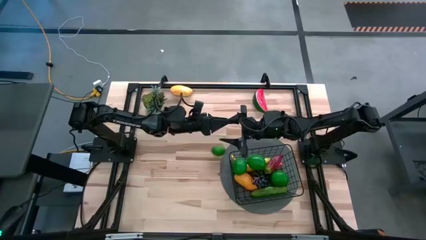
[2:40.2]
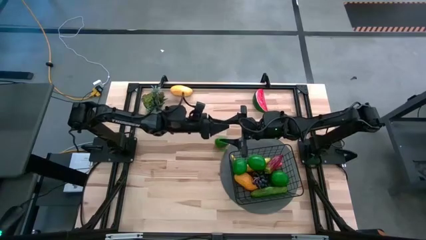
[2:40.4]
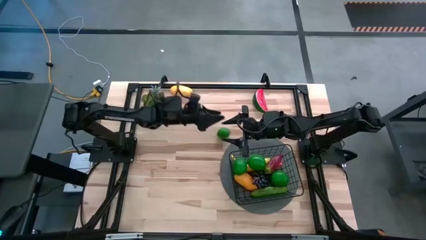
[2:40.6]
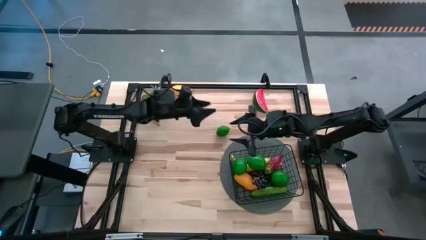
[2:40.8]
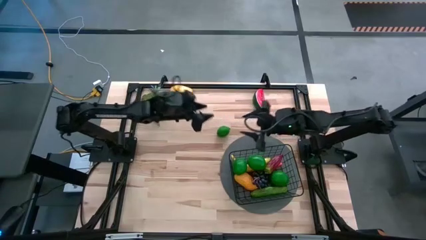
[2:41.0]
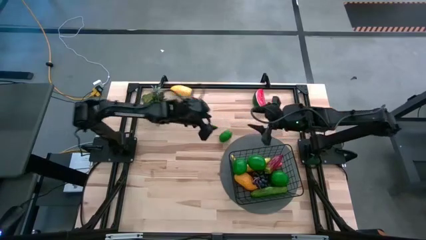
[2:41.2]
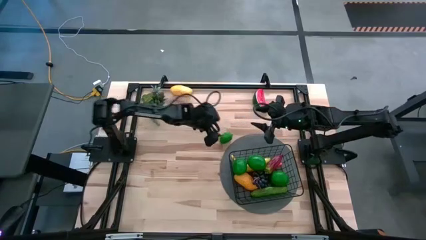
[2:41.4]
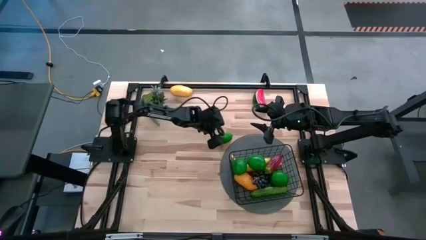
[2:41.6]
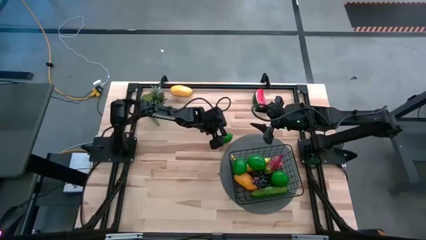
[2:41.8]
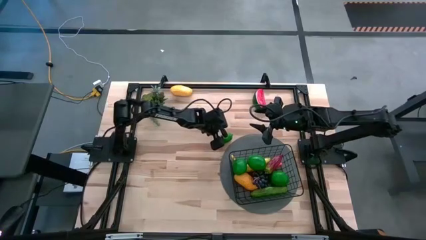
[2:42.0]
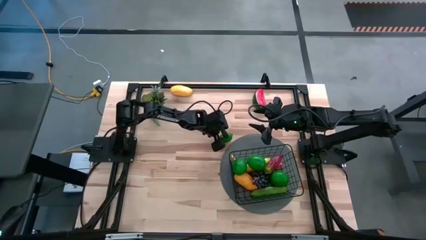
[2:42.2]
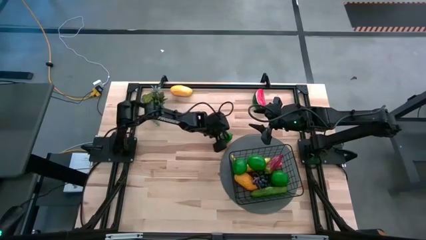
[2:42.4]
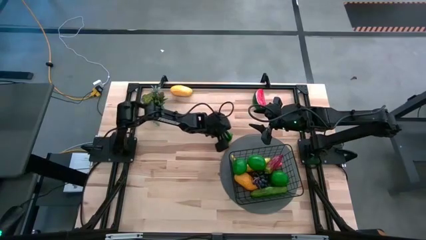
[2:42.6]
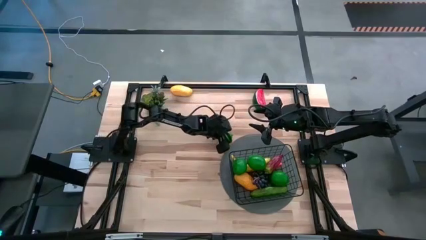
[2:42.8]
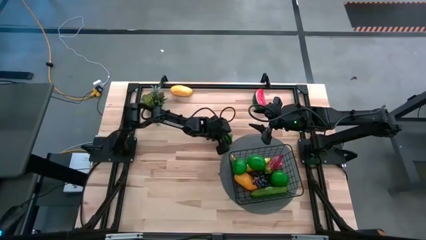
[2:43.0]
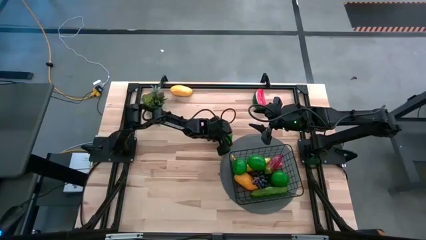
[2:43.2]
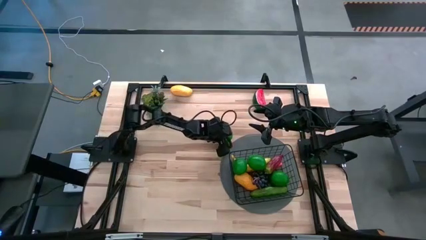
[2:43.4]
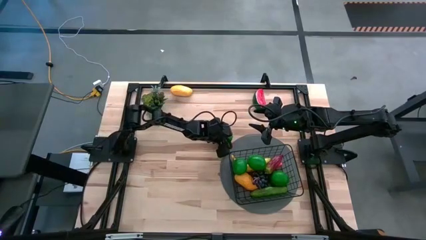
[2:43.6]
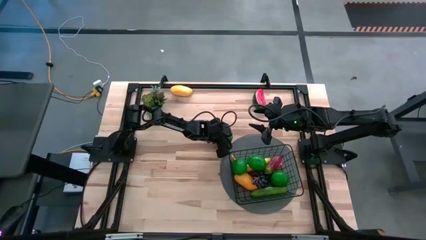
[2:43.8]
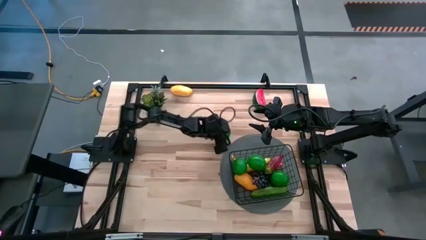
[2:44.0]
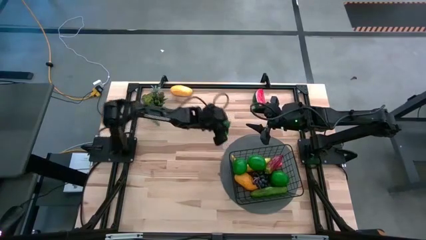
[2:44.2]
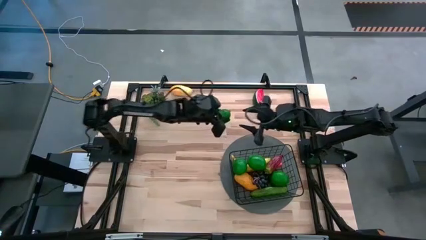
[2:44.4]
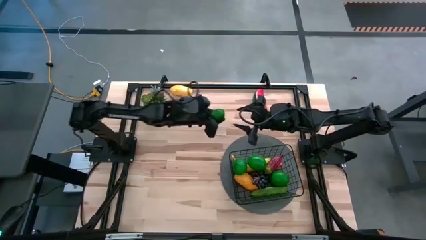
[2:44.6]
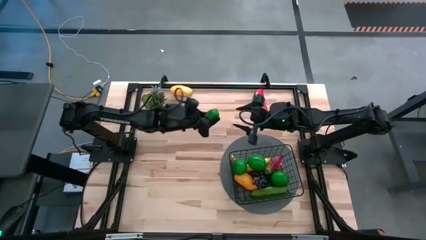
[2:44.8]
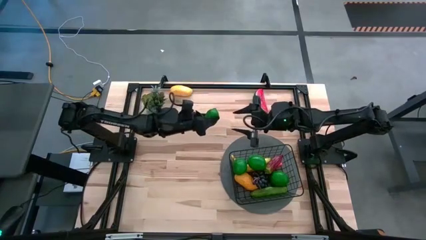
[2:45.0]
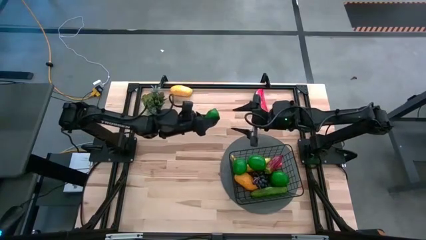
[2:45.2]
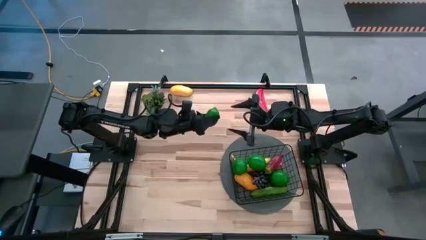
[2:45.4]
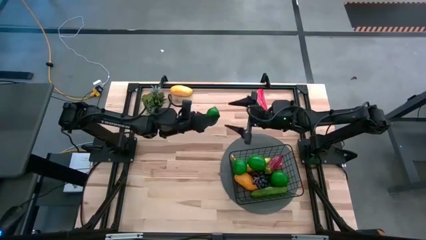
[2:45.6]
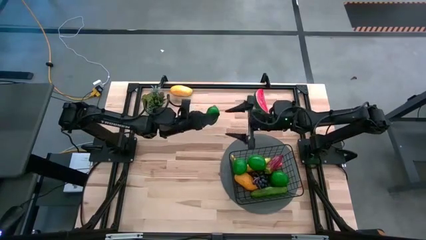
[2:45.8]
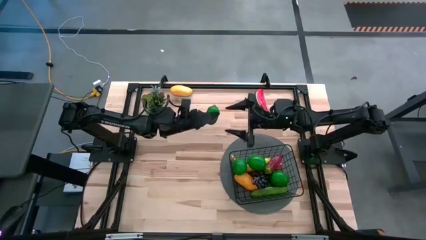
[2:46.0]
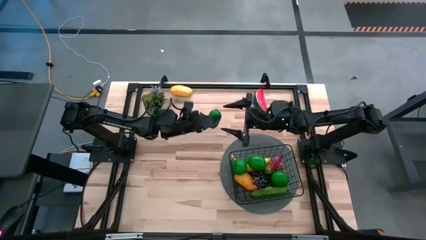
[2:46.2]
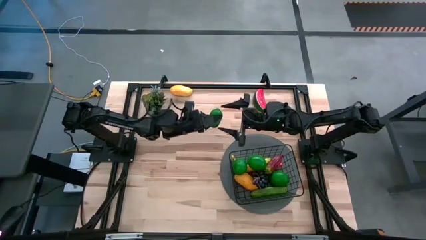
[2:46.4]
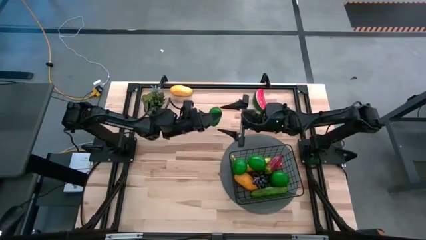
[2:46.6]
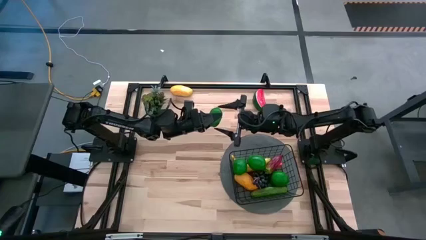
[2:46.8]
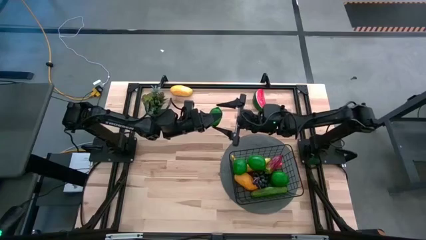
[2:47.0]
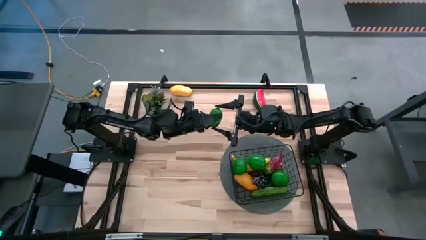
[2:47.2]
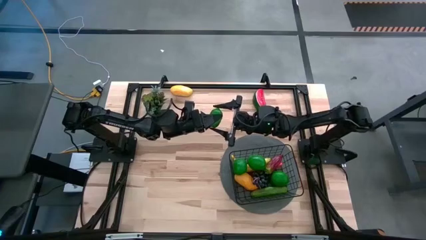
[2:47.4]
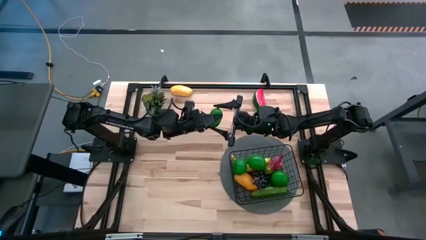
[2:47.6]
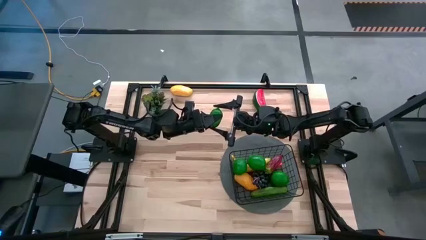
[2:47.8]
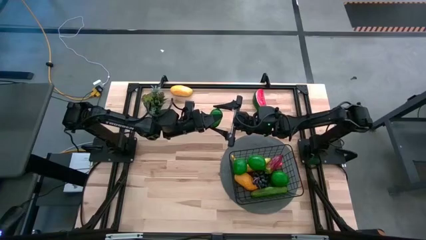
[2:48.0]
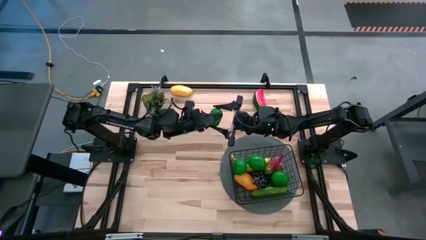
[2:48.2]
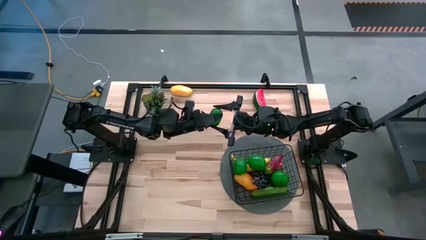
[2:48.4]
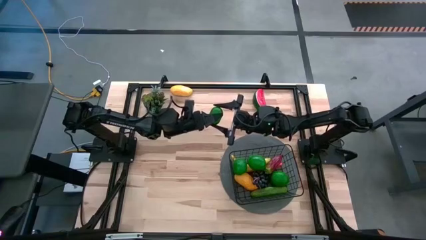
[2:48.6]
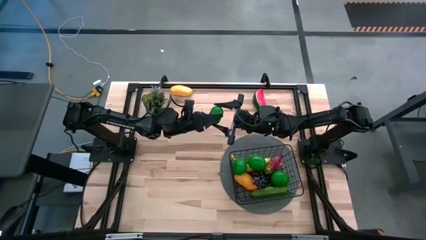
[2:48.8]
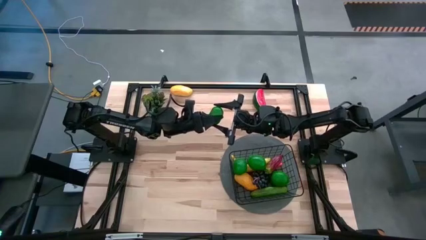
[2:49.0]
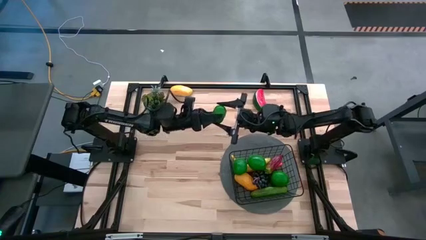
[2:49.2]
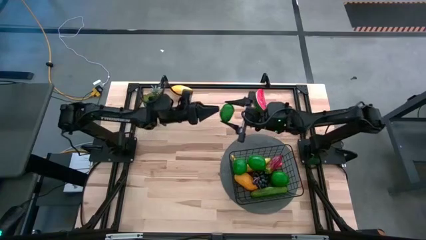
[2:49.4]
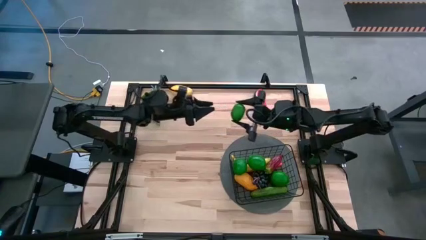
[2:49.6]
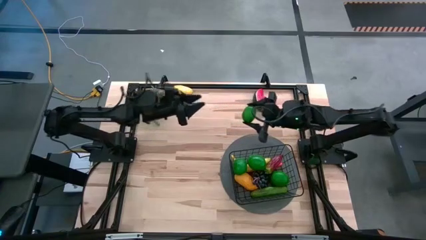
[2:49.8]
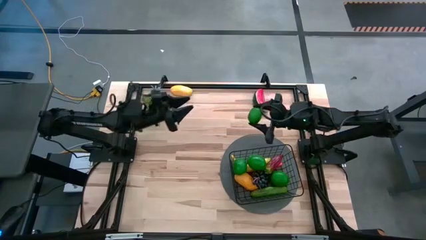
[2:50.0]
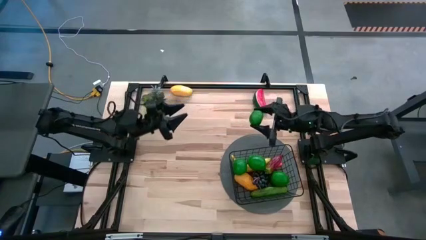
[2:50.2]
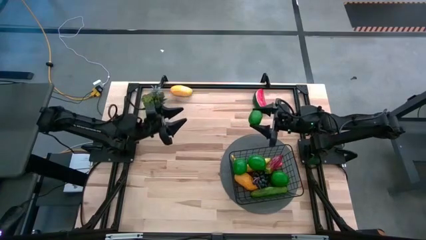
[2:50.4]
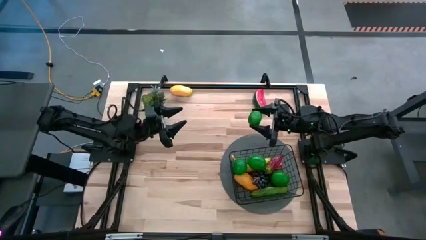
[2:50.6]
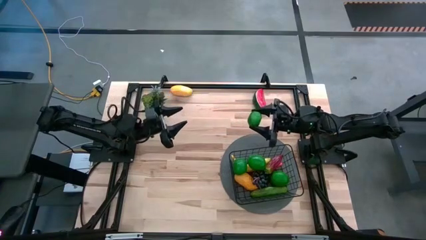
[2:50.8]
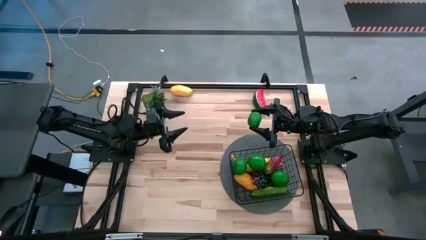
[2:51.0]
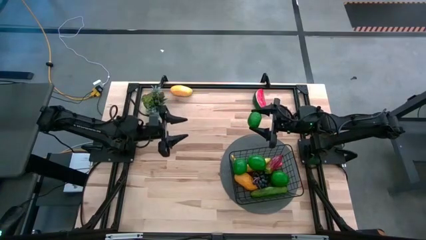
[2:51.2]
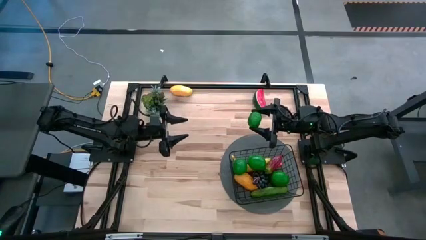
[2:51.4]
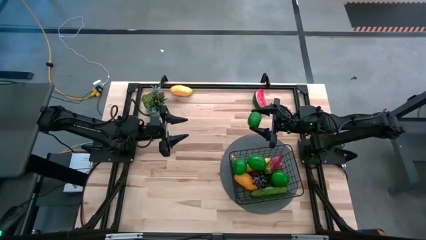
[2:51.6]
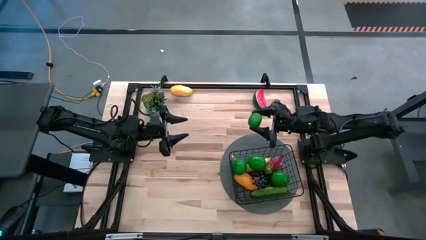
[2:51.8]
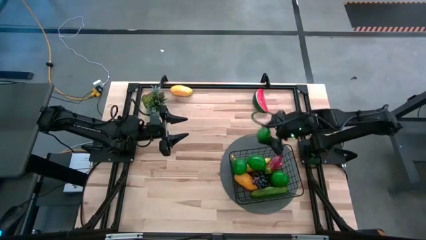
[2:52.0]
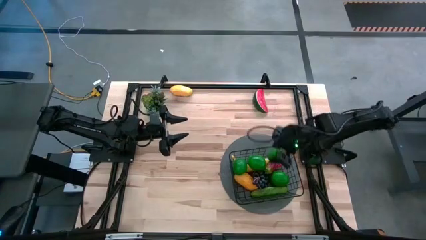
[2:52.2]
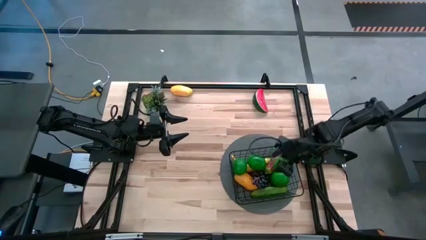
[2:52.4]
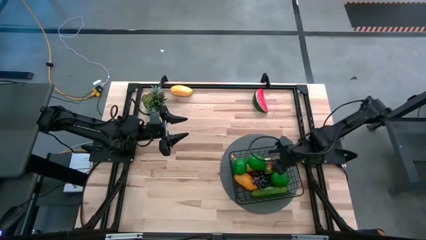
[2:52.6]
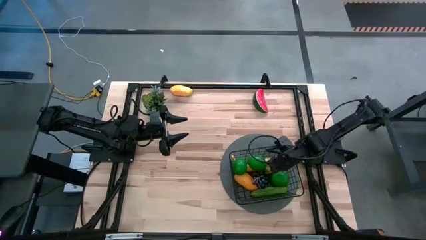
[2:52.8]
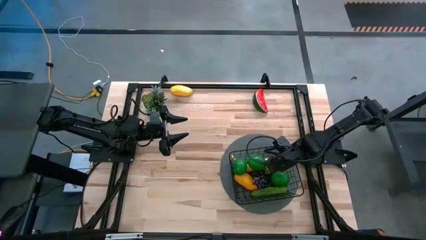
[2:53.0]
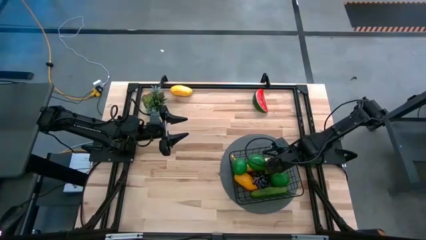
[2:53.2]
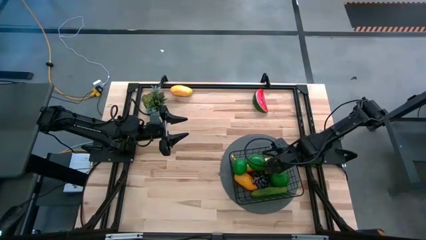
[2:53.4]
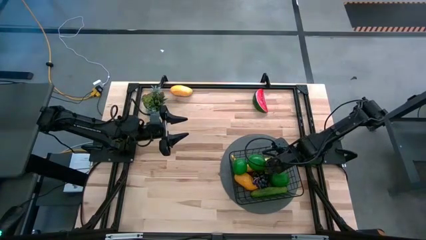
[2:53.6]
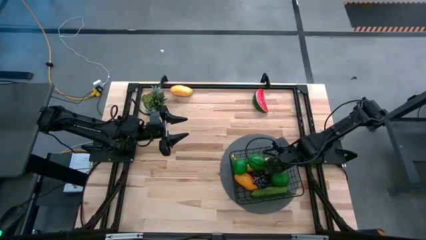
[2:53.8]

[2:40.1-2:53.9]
Task: Build produce basket
Put the green lime into the black basket

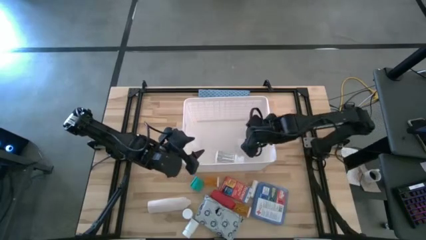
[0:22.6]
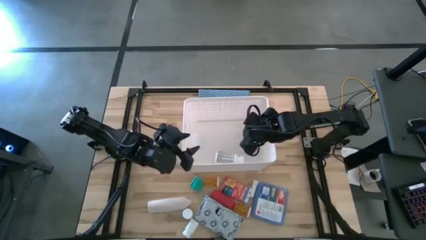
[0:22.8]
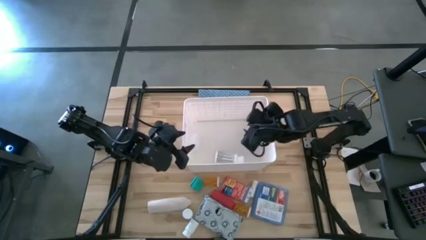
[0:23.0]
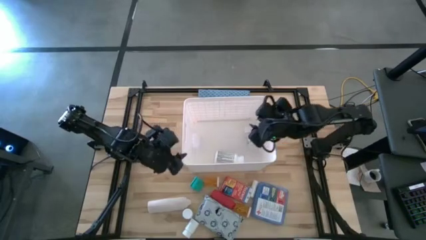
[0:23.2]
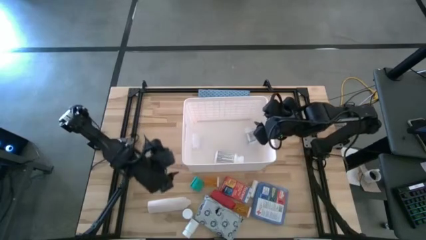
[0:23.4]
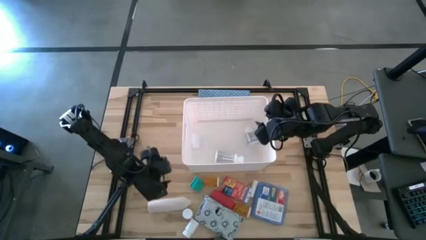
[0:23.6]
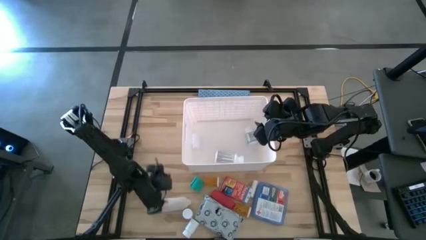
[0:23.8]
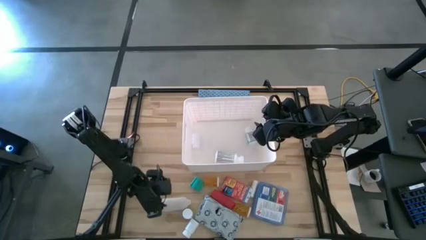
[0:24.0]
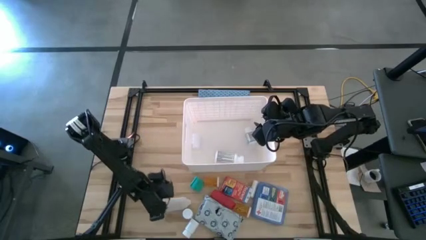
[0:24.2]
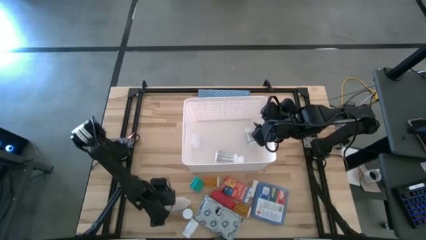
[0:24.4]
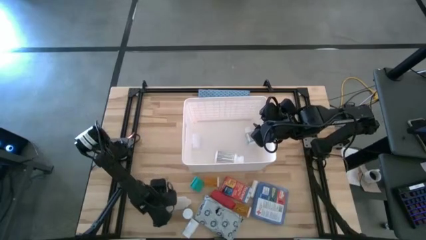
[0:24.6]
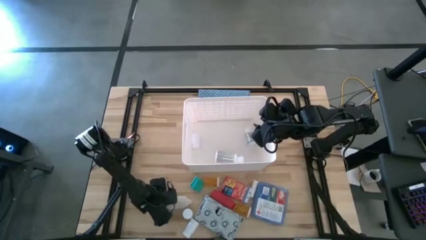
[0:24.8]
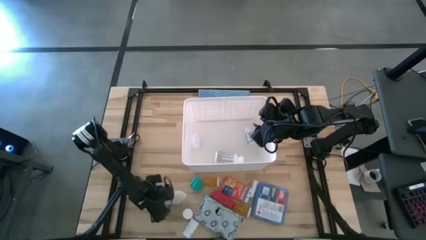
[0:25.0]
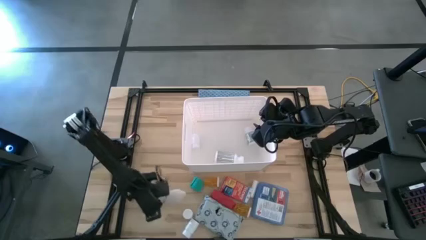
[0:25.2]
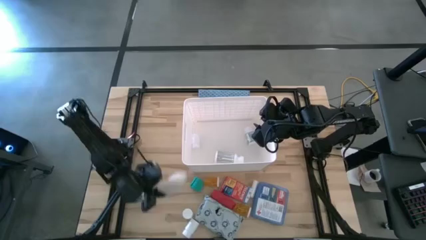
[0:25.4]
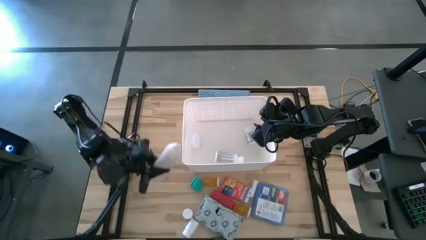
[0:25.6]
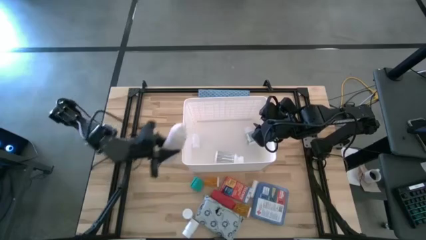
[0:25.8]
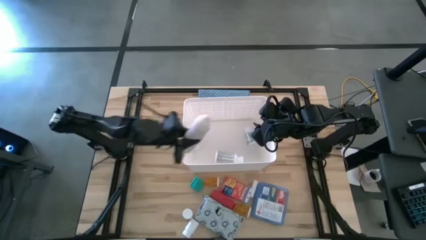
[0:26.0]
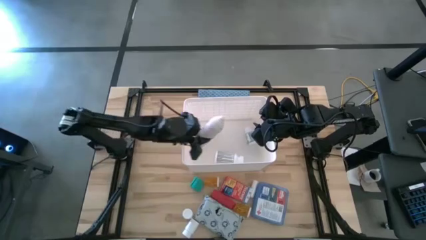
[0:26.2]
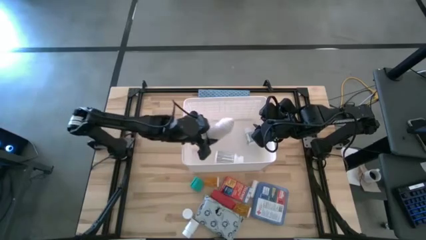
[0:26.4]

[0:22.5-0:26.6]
Task: Pick & place medical supplies in basket/bin
Put the white bandage into the white bin
